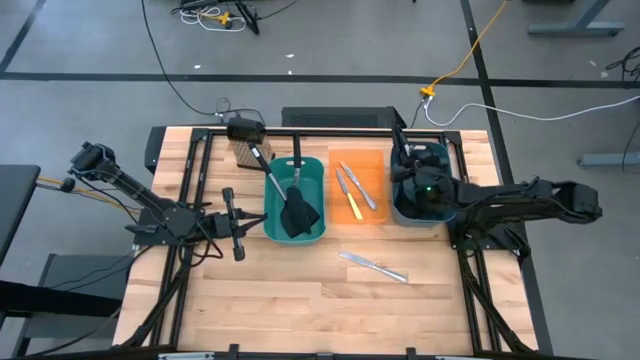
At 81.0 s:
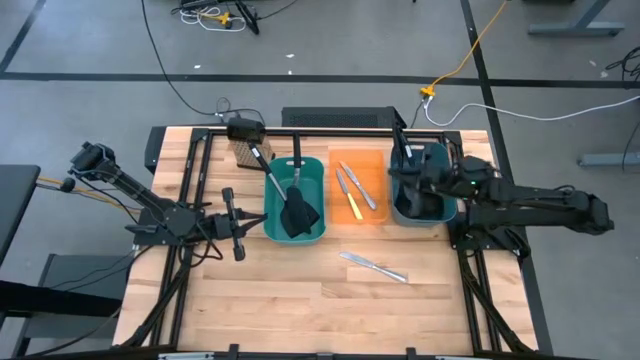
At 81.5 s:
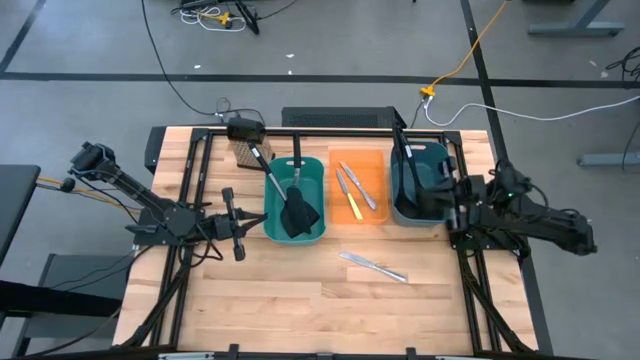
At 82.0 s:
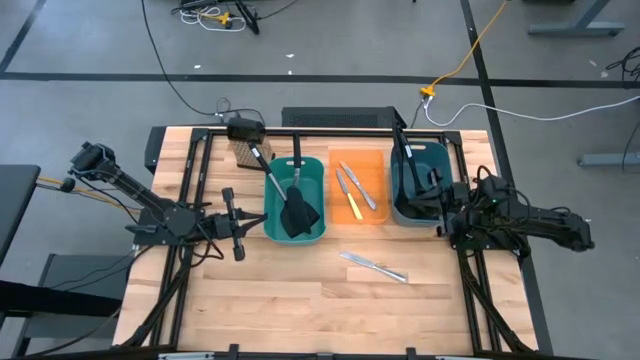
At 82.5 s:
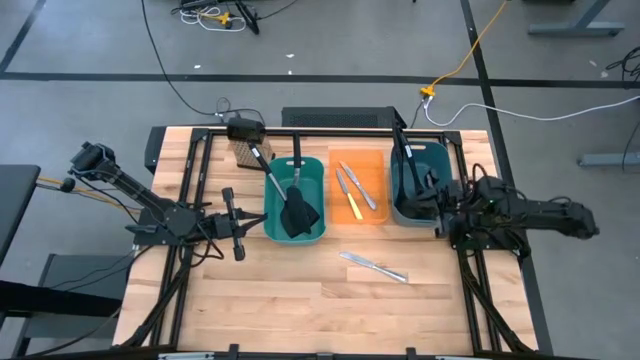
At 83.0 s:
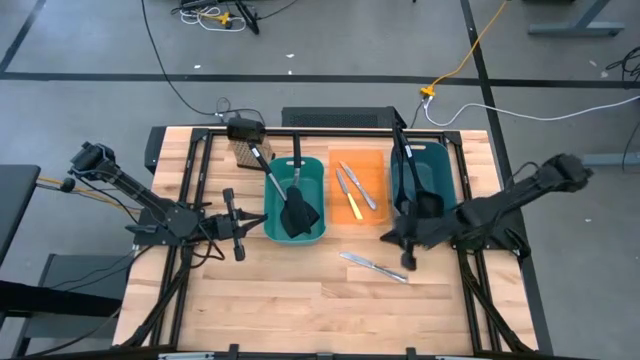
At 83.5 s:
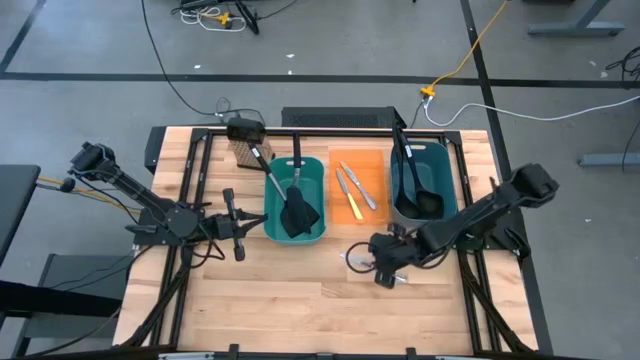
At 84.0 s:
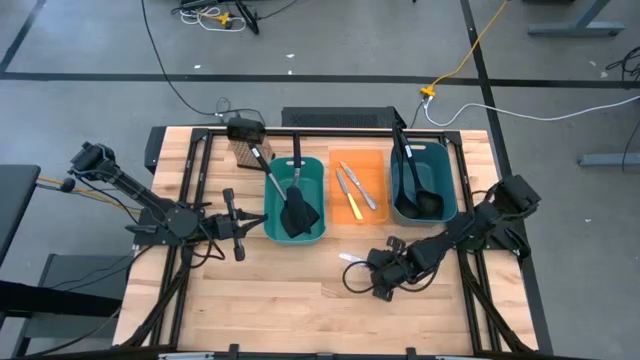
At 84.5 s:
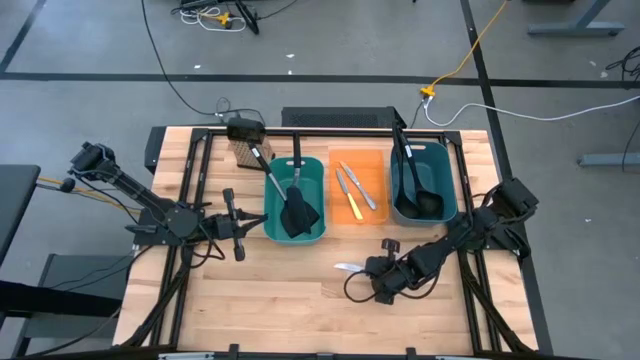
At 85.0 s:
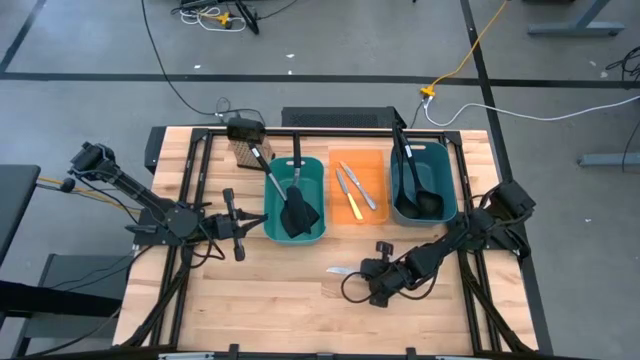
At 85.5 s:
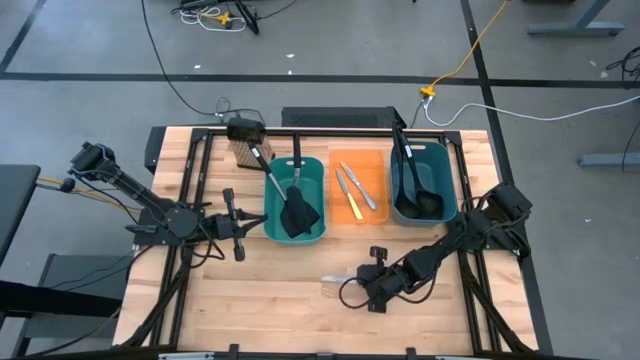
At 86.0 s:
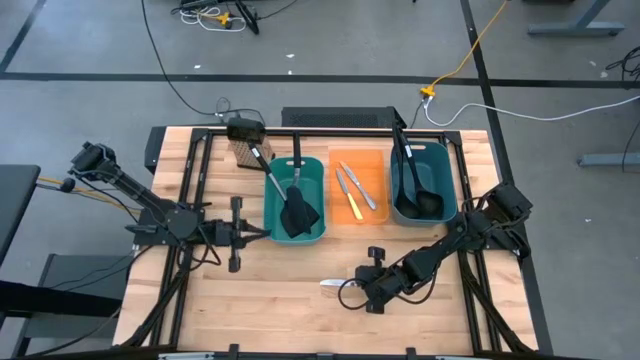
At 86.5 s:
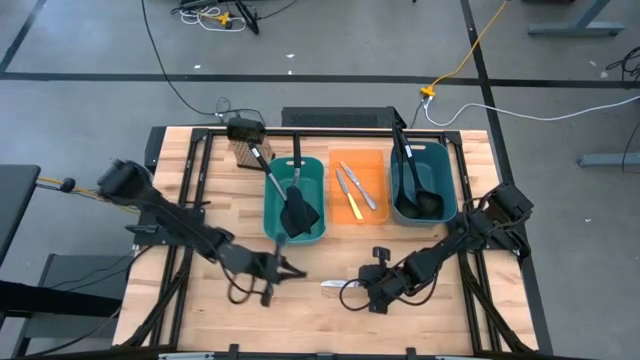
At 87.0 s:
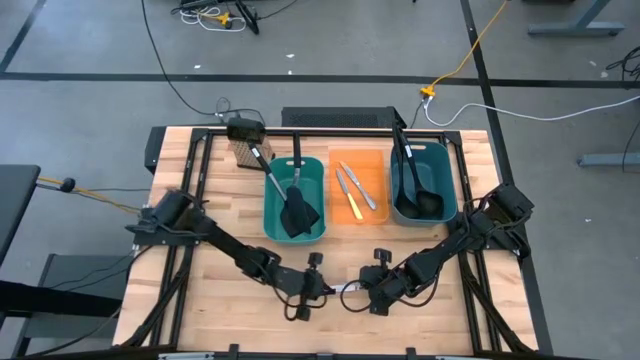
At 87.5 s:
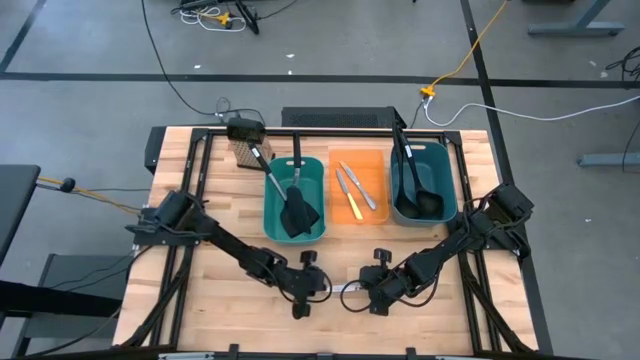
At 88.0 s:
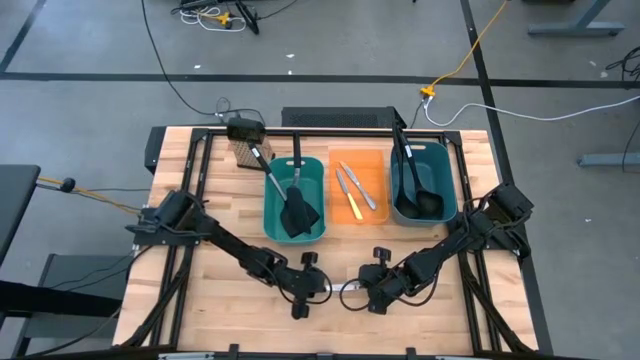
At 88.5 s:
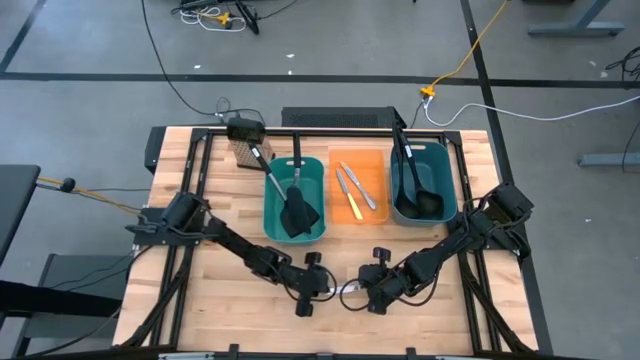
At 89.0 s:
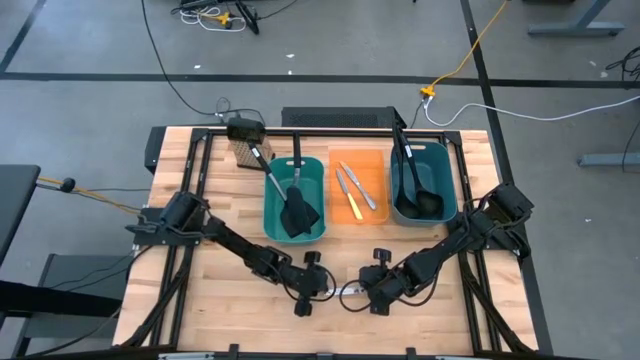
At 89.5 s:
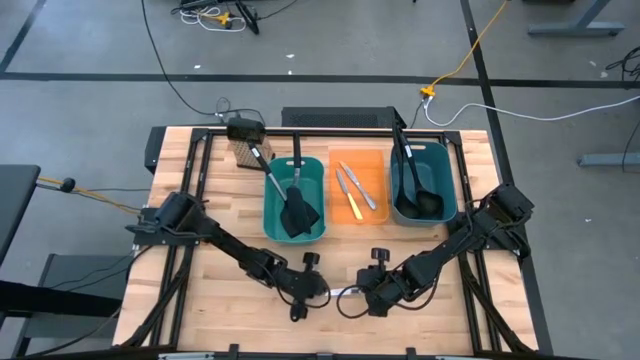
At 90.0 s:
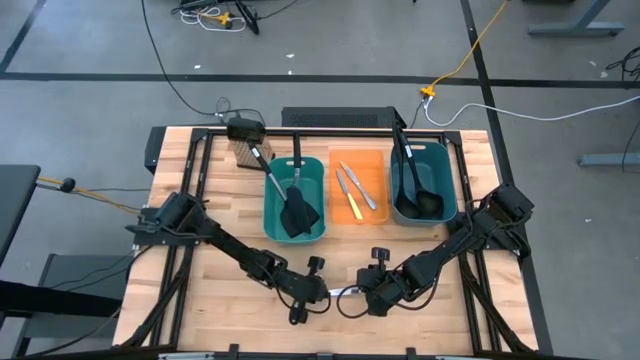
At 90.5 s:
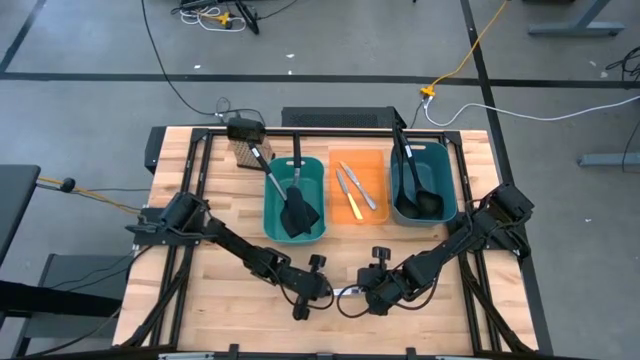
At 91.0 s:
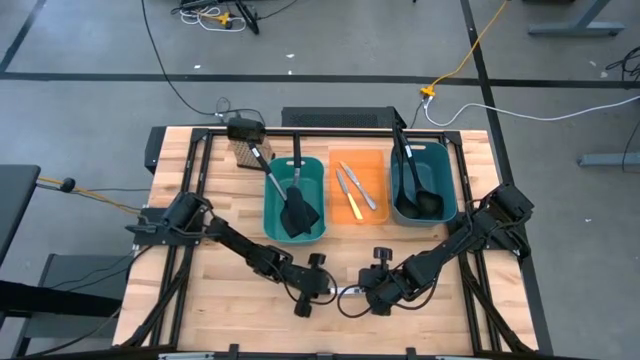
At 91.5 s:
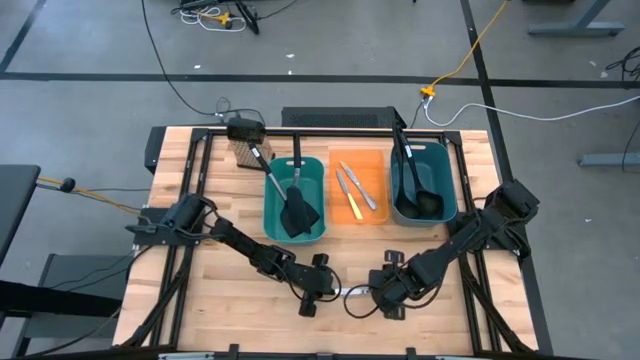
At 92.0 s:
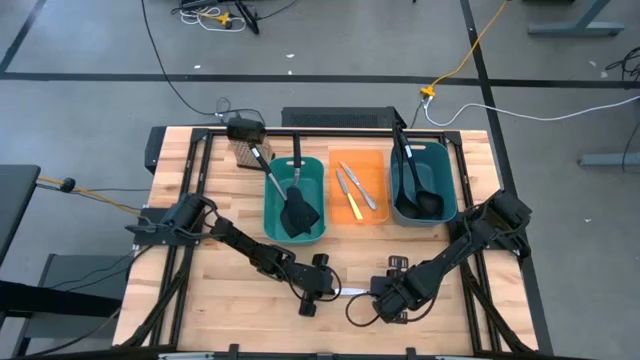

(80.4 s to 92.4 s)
Task: Pick & Place Kitchen Items
Put the silver table knife into the orange bin

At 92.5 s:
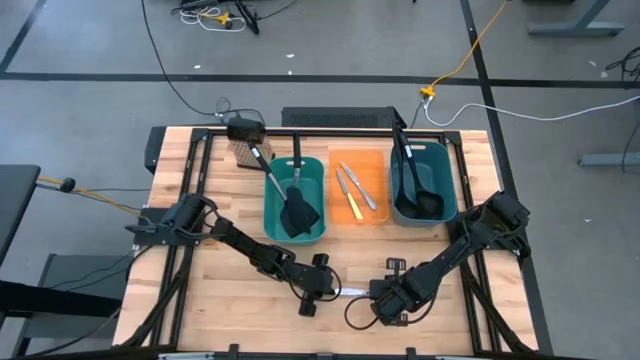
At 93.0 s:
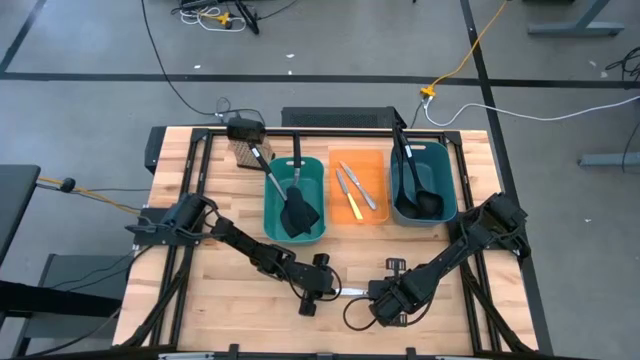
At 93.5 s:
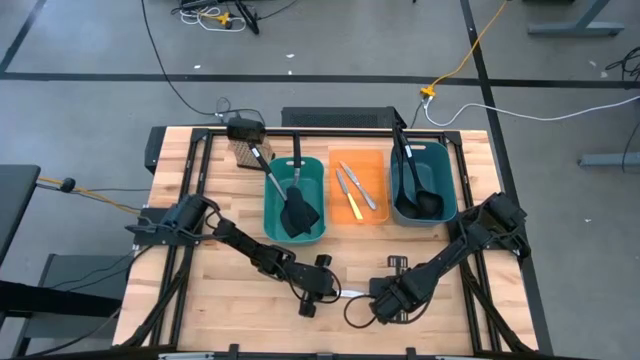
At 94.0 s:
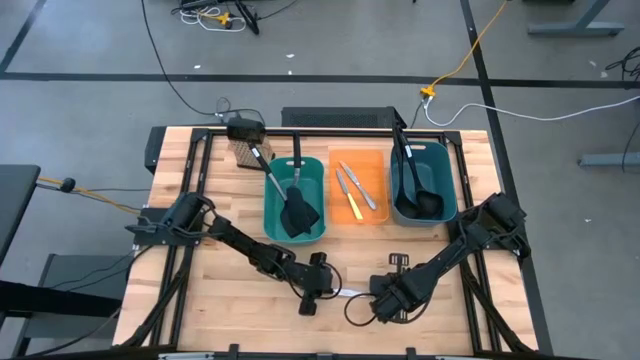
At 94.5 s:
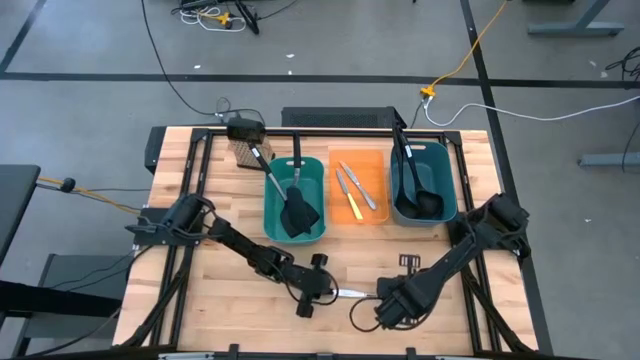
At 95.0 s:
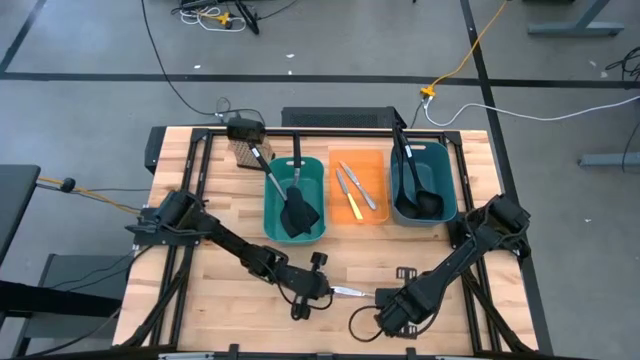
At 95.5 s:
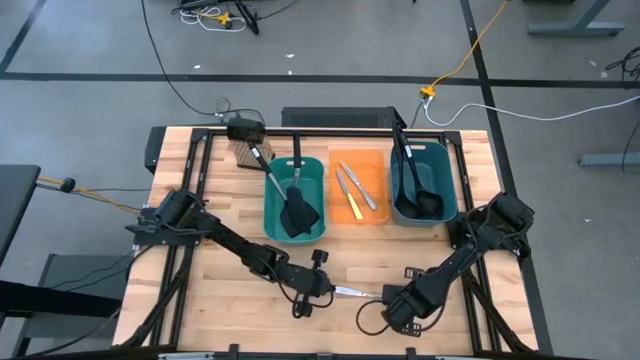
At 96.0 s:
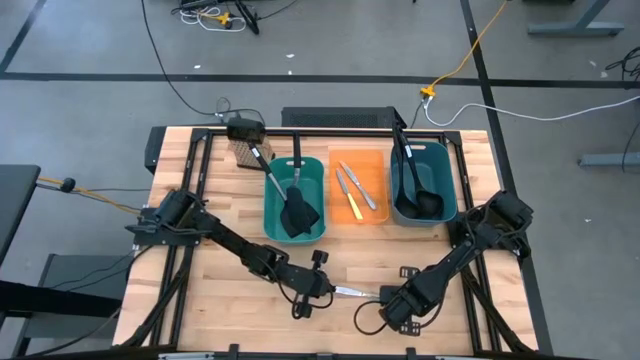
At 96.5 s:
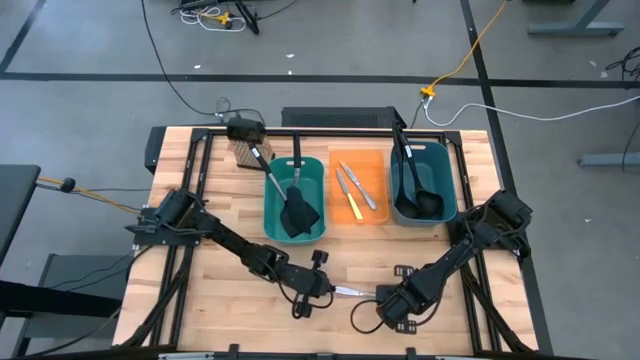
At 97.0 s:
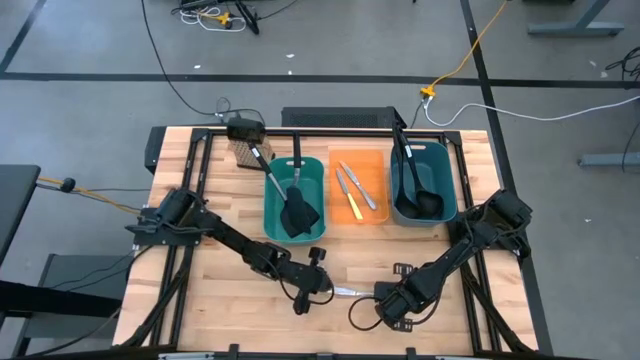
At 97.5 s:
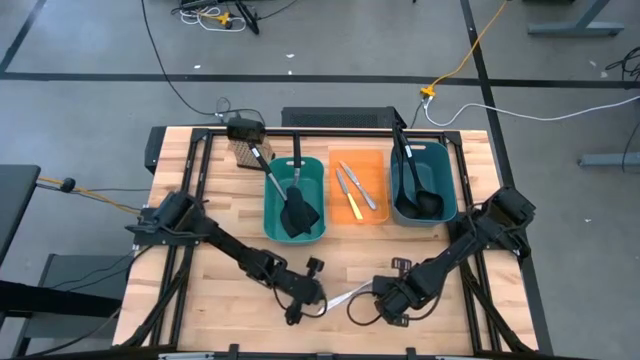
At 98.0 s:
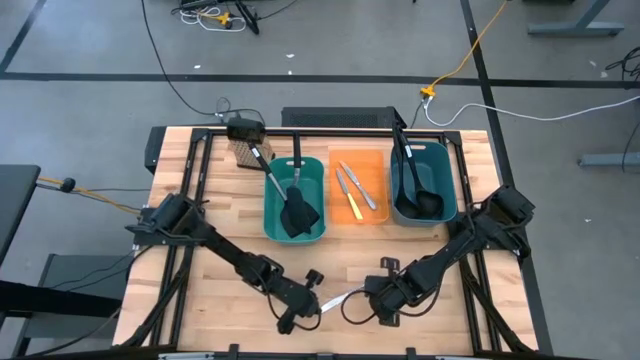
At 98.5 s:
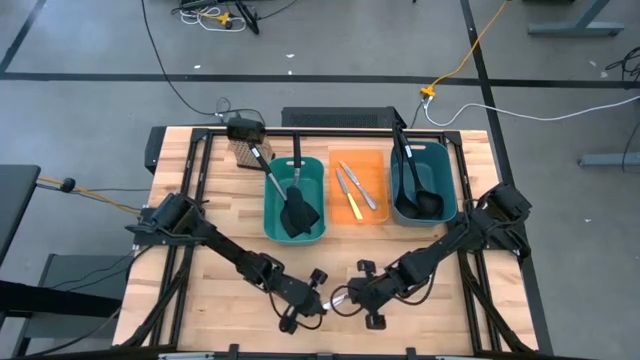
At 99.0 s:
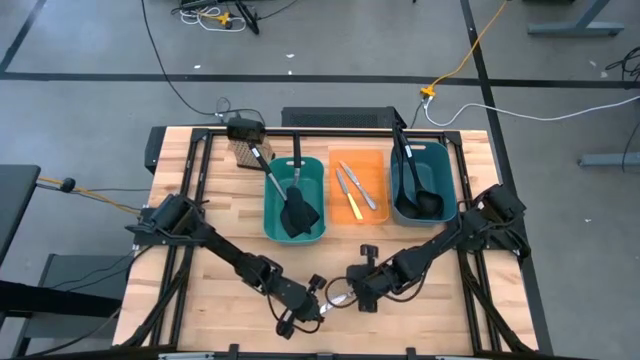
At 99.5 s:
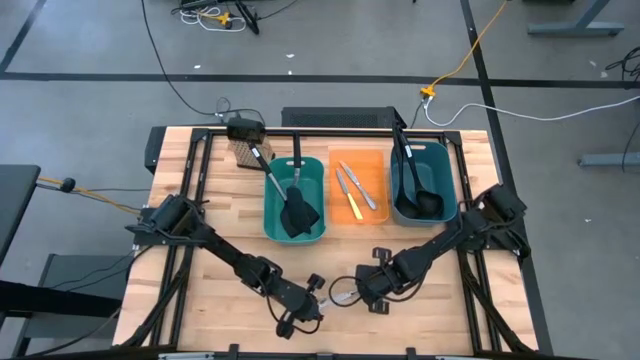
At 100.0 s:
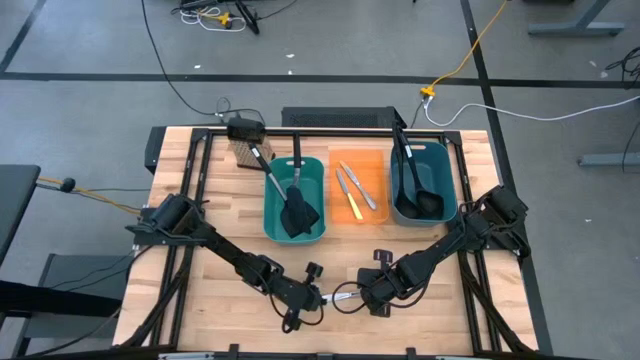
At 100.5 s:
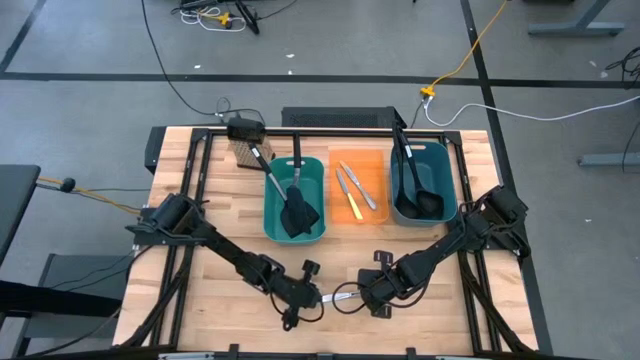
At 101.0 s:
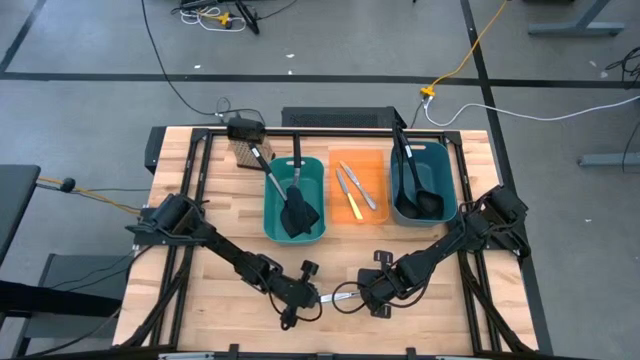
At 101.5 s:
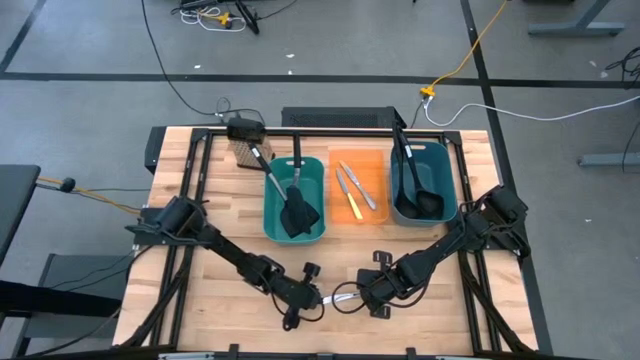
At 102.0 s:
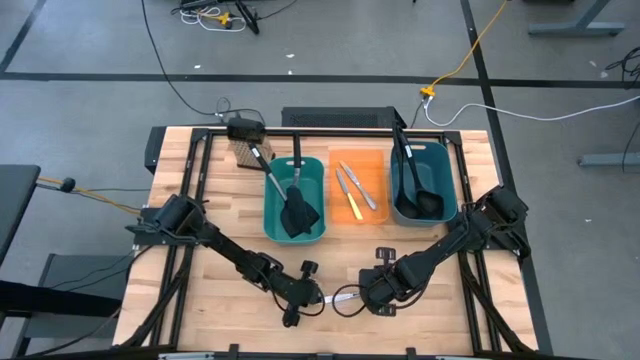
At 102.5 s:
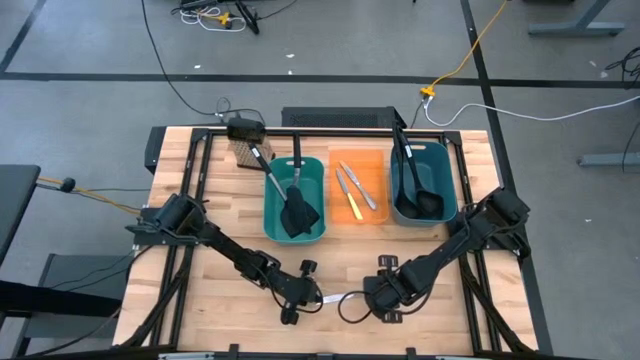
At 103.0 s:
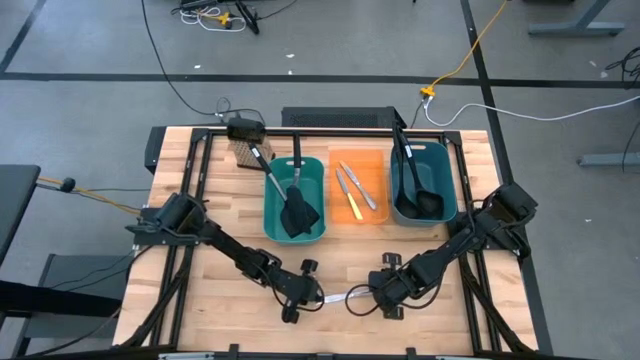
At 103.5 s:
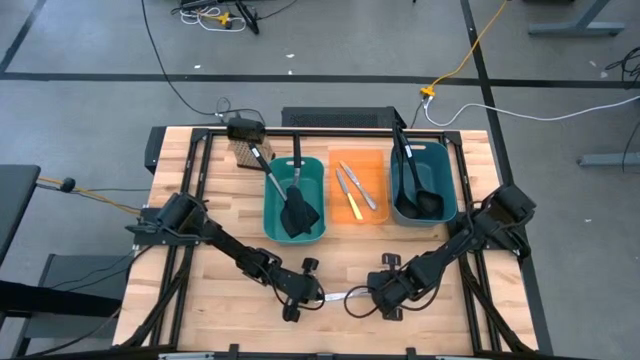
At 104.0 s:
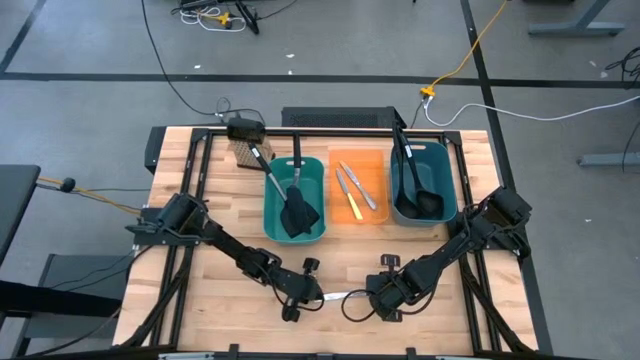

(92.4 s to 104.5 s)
Put the silver table knife into the orange bin
